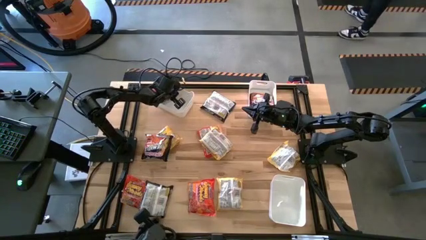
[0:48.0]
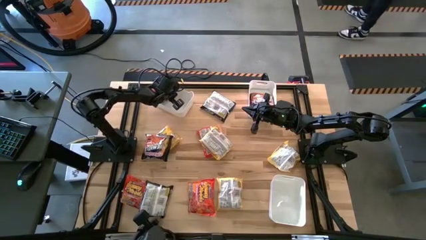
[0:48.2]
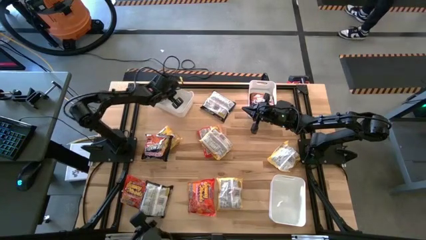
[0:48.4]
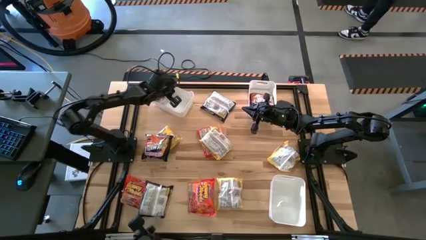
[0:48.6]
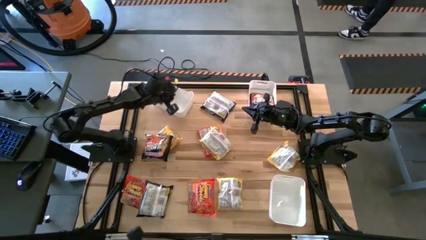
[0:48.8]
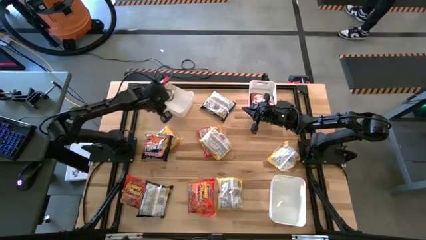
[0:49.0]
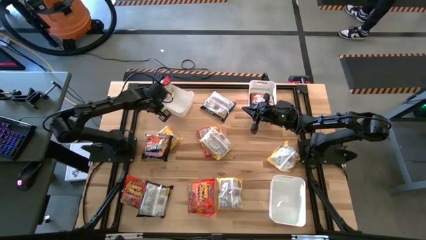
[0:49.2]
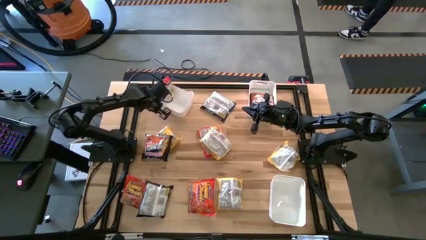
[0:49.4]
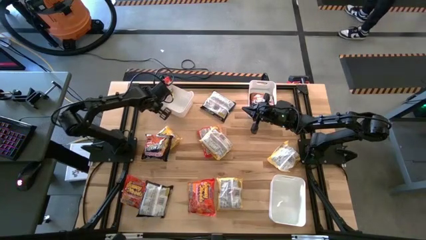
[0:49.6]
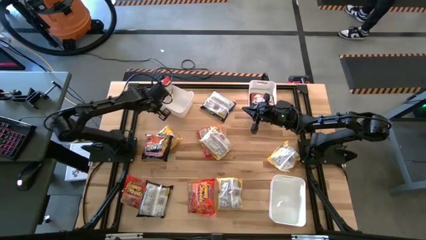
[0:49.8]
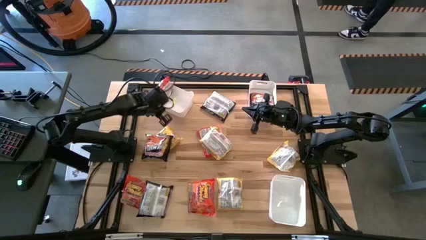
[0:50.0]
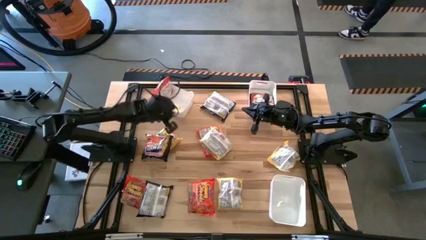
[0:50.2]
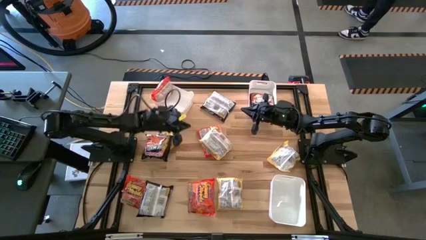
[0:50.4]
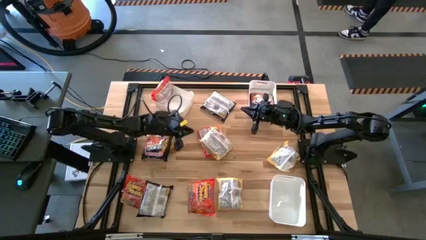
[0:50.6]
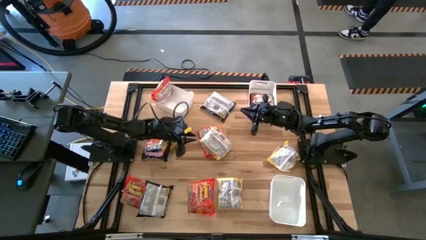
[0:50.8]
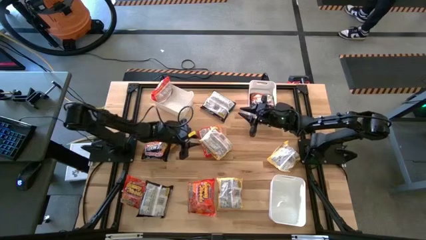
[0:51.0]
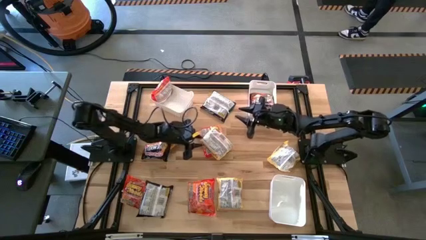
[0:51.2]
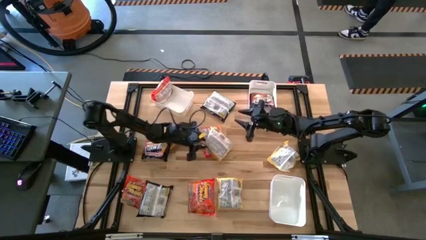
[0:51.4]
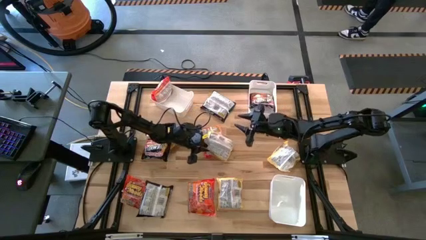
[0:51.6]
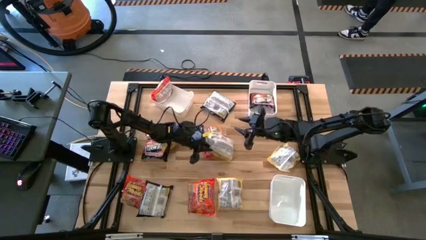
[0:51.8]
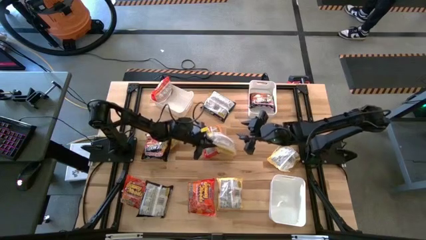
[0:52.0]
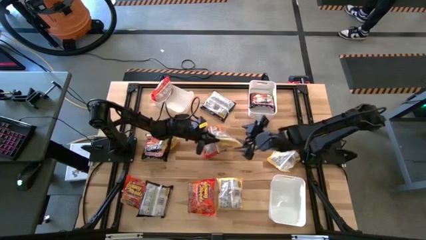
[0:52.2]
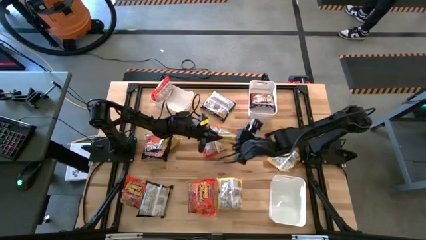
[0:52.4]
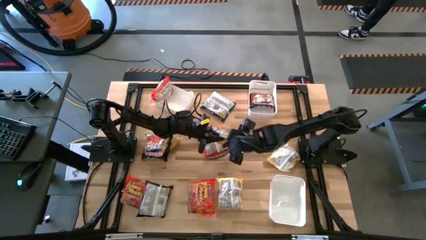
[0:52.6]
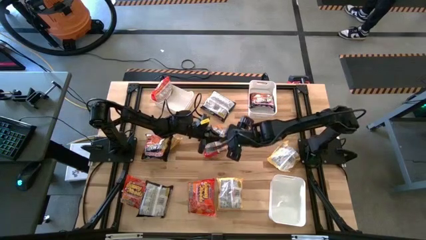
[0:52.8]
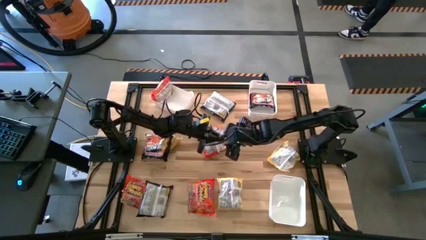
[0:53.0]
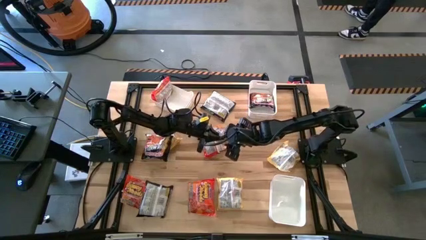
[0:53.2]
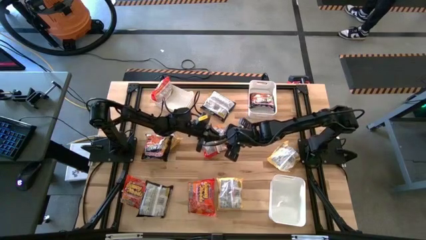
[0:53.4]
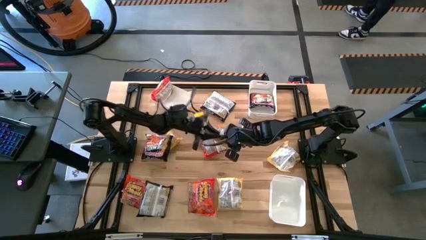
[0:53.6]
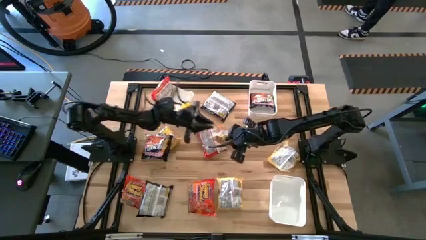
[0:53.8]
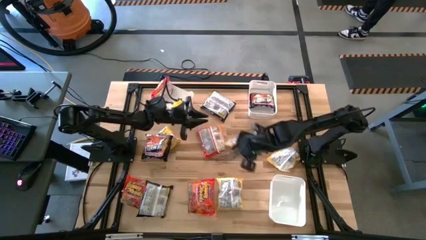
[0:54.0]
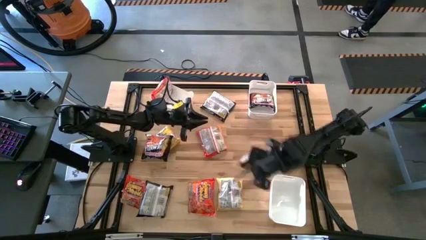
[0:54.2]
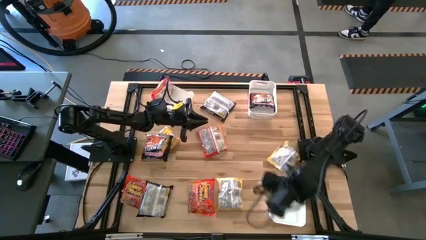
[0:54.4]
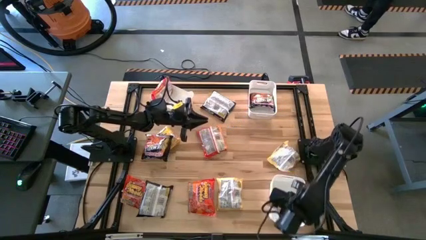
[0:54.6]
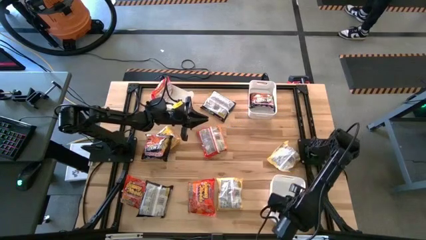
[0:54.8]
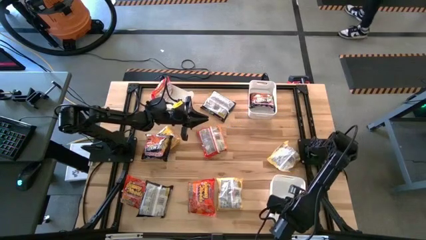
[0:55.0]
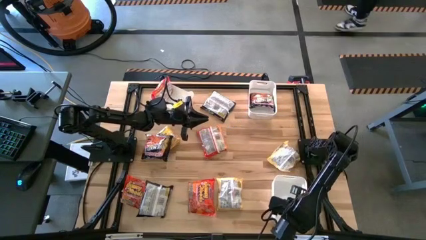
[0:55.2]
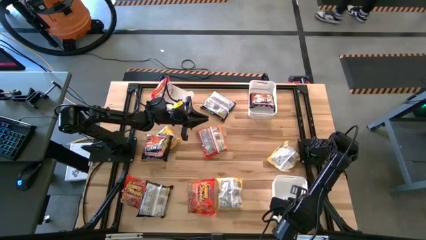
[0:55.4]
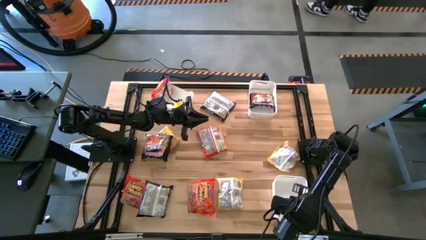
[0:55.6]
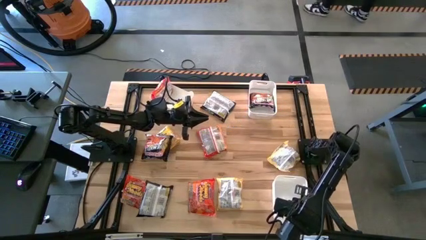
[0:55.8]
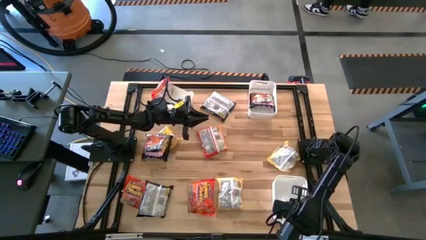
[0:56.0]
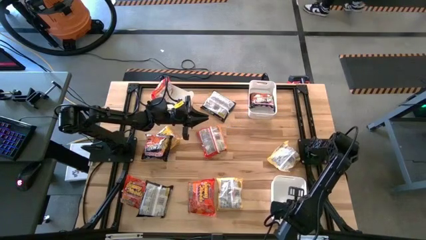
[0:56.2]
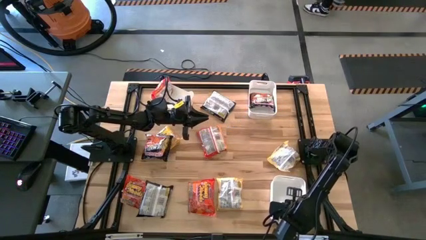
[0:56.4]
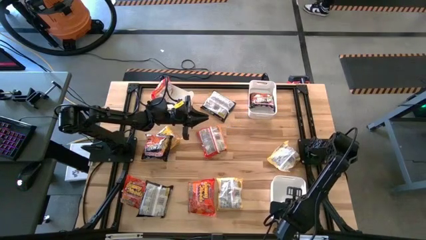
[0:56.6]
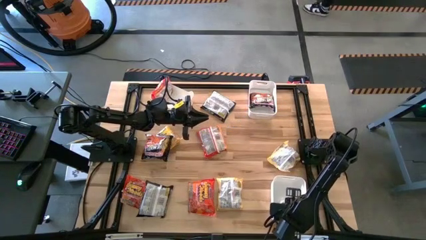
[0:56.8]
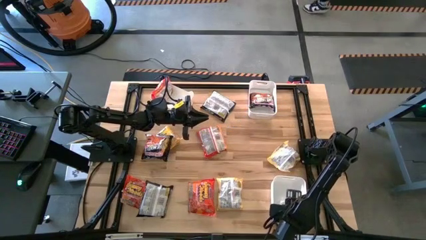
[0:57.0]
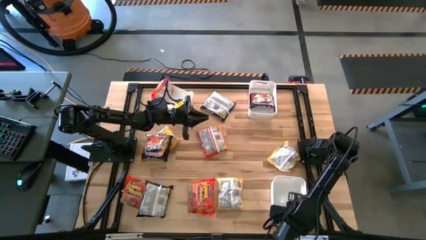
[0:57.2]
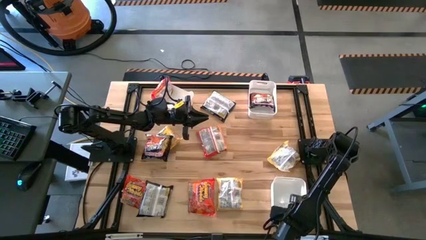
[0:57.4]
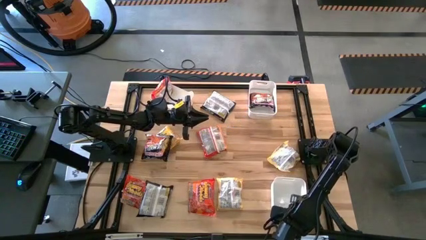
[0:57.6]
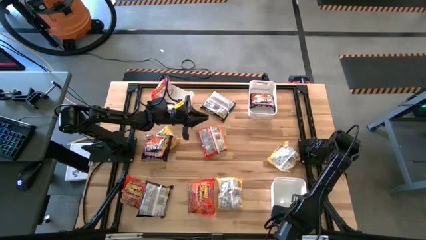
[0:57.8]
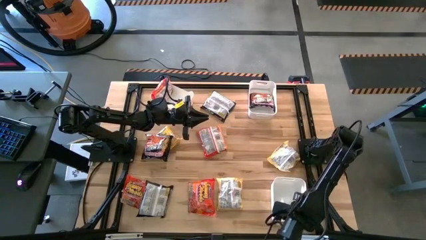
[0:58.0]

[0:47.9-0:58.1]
Task: Sort Maruchan noodles
Put the yellow noodle pack into the bottom white bin

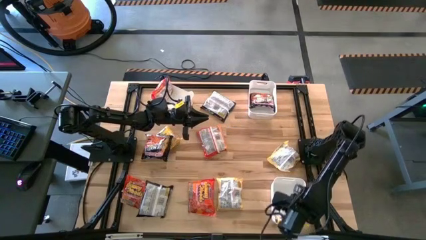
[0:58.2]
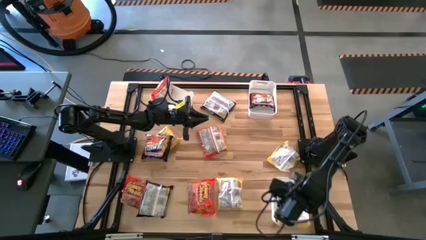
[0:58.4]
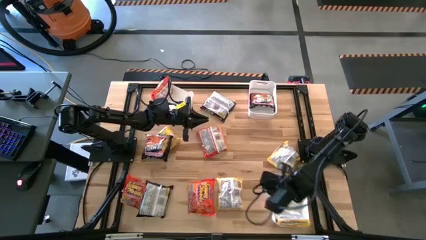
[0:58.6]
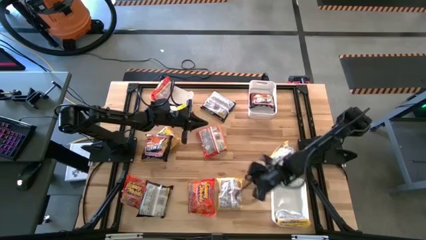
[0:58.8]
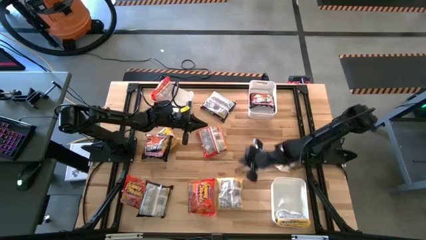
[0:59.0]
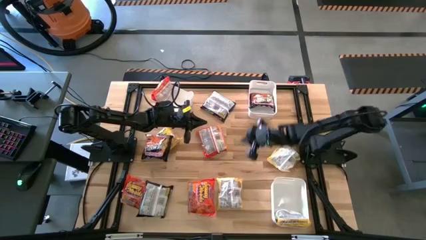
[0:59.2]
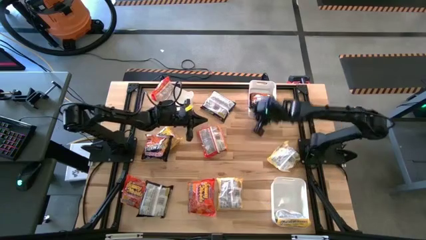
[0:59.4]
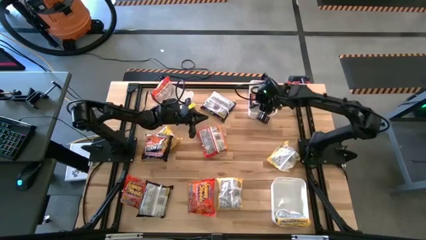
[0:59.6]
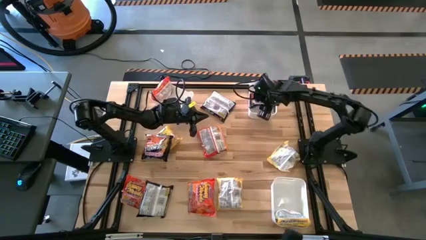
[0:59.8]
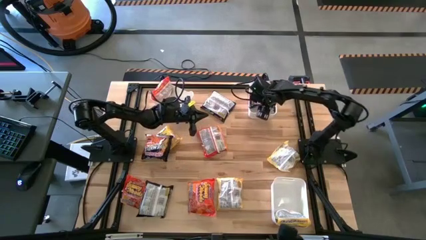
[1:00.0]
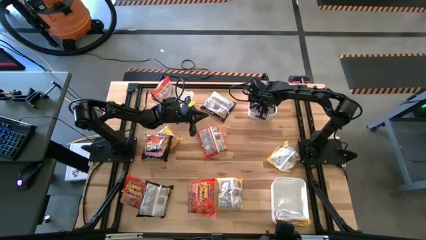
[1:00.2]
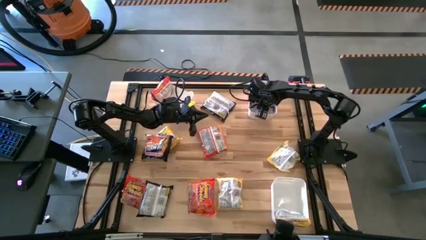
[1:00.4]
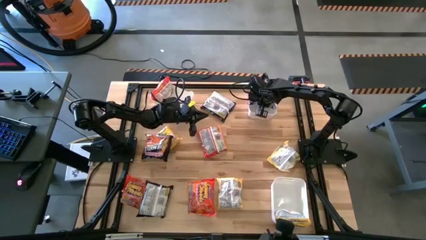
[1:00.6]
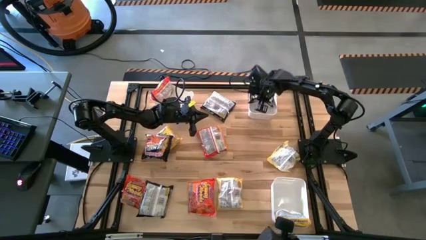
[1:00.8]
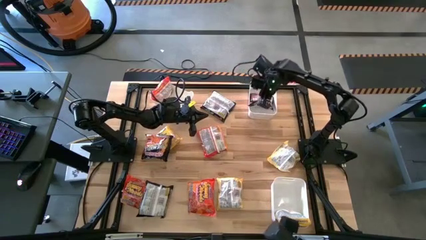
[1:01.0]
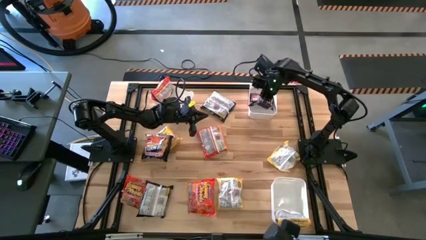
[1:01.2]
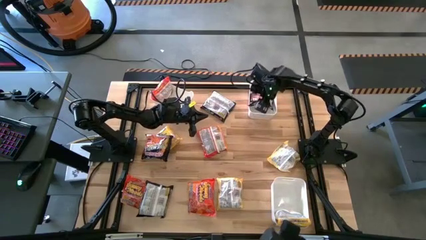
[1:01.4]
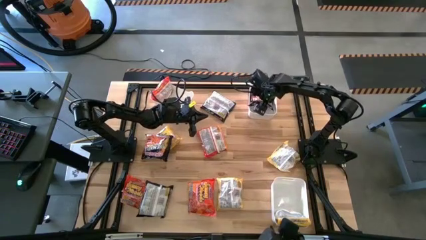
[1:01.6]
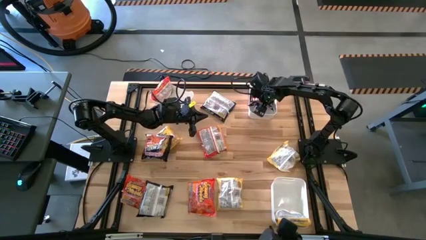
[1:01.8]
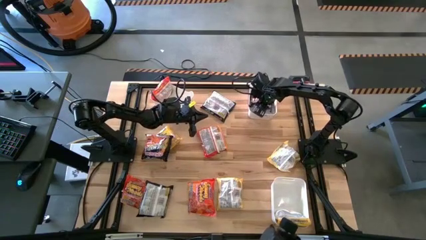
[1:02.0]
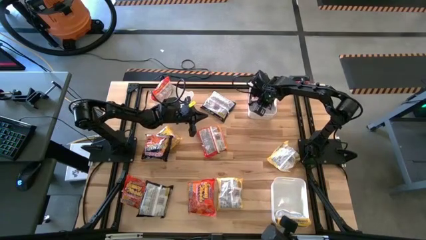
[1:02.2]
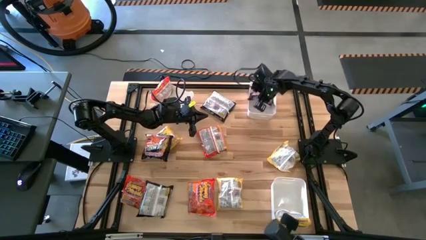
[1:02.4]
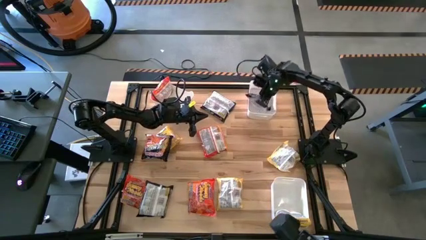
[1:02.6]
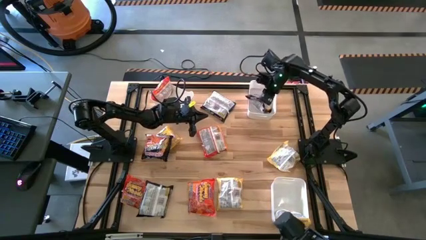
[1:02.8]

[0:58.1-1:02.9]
Adjust the black noodle pack in the top right white bin

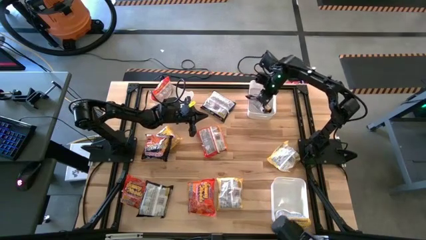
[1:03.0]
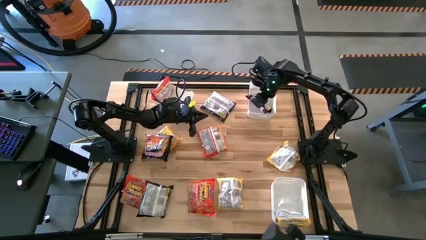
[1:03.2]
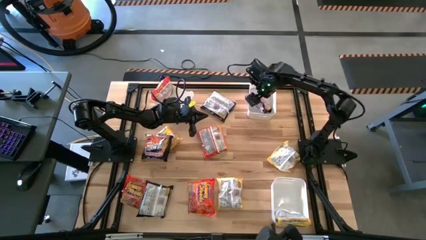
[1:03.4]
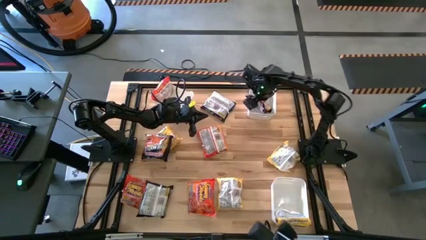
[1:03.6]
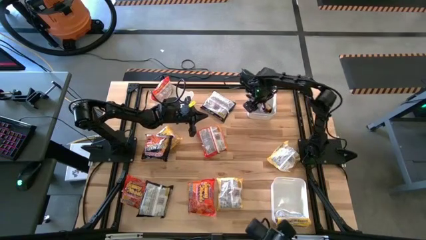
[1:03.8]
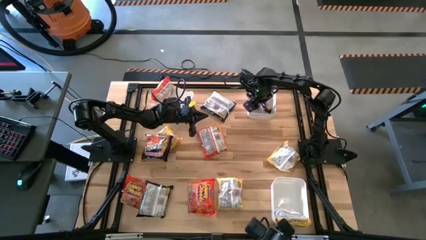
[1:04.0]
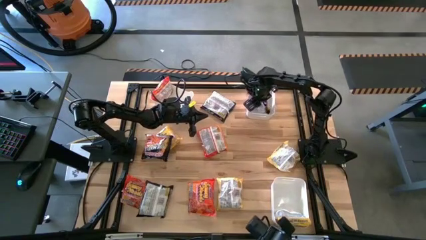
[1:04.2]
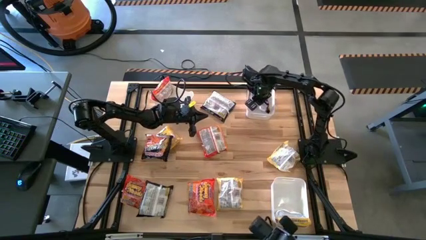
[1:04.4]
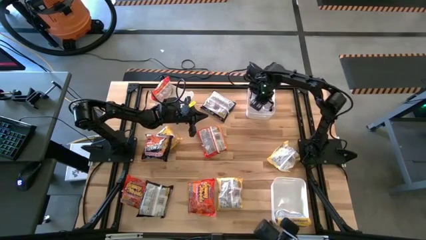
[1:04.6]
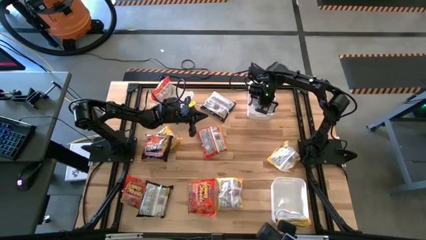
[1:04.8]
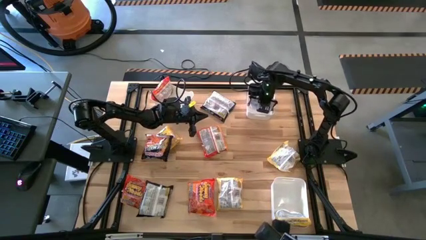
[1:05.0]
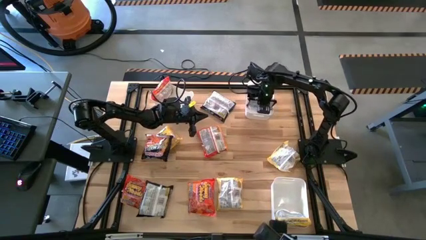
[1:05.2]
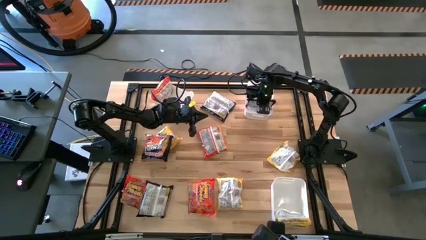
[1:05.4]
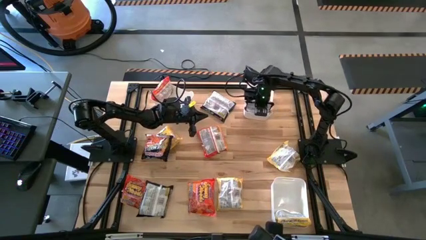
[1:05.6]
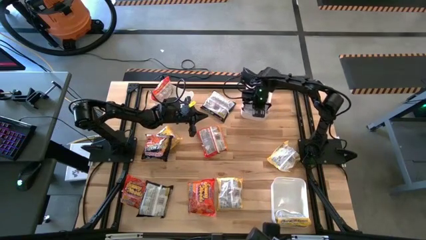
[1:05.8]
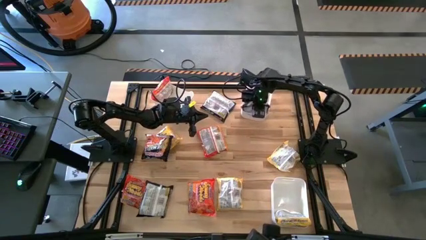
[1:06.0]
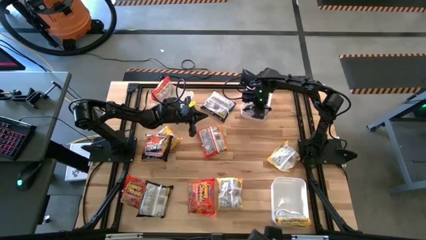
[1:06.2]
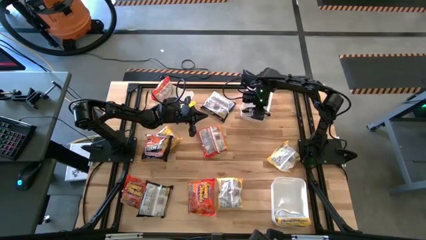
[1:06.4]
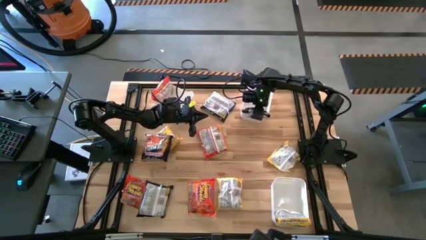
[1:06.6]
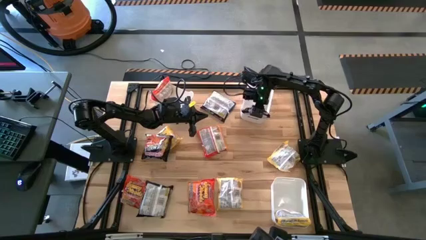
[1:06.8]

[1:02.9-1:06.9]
Adjust the black noodle pack in the top right white bin
